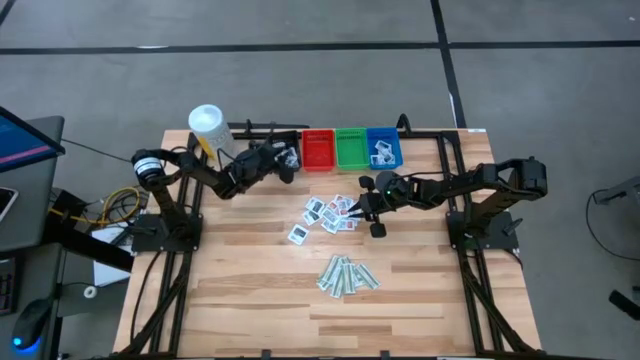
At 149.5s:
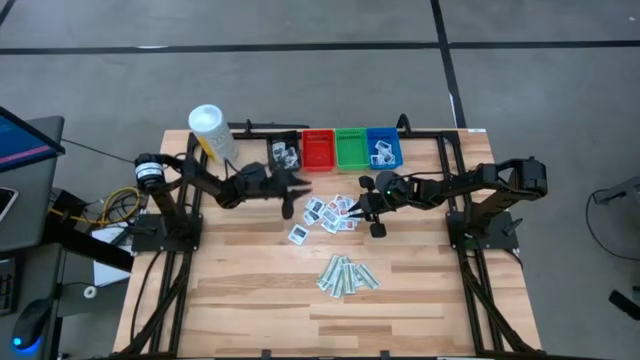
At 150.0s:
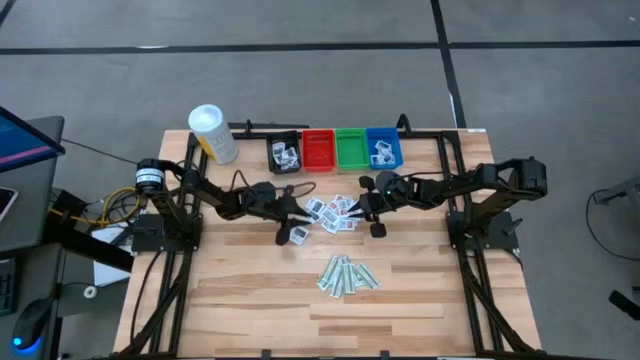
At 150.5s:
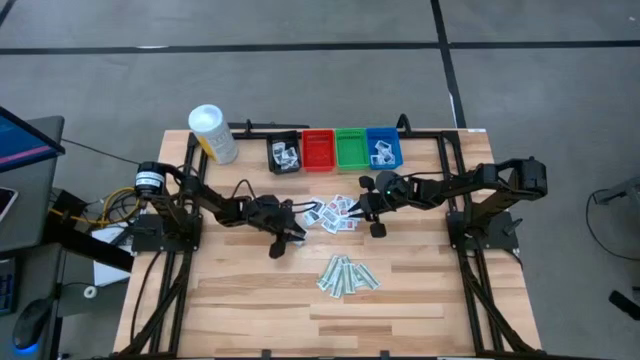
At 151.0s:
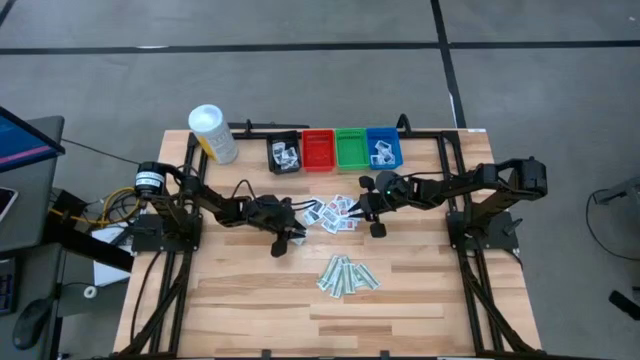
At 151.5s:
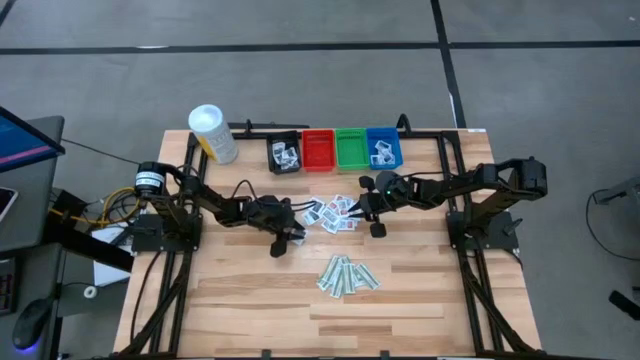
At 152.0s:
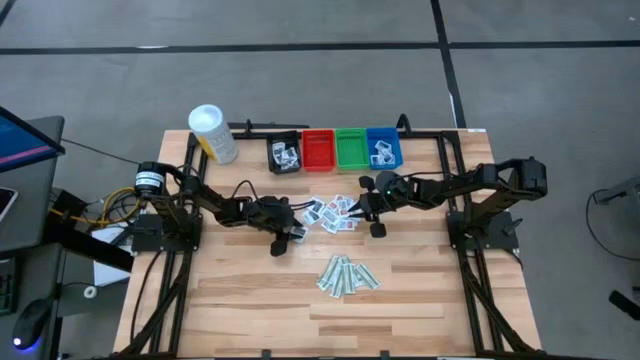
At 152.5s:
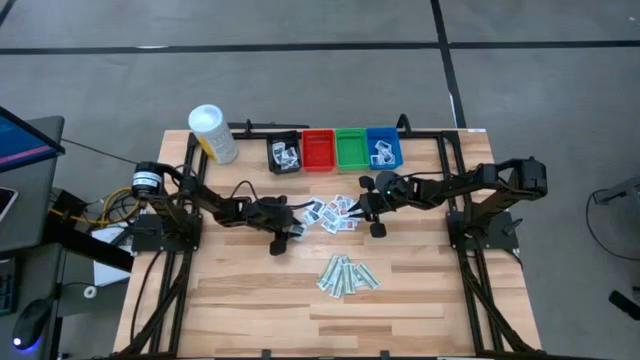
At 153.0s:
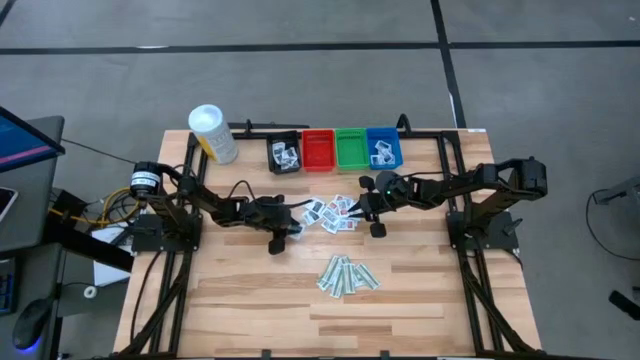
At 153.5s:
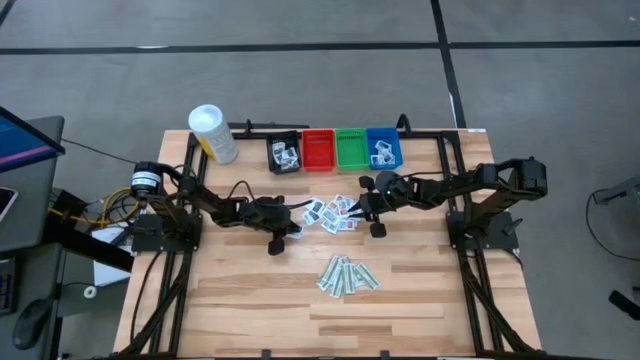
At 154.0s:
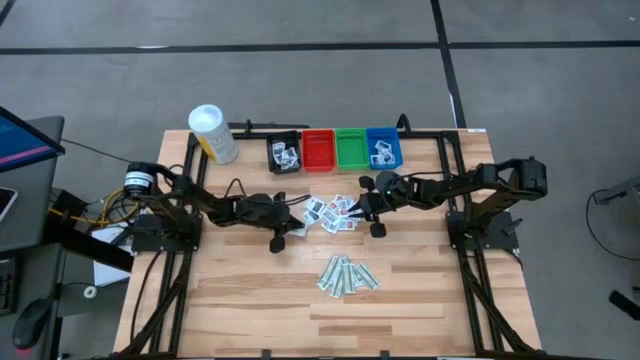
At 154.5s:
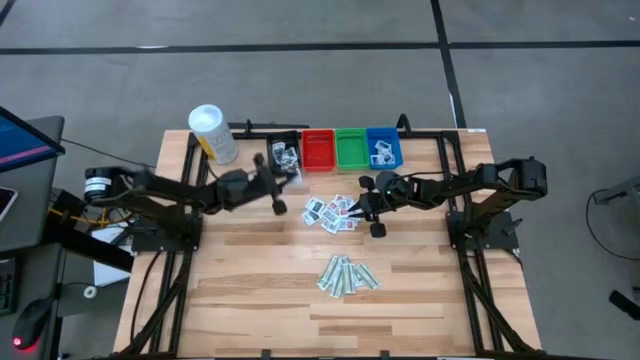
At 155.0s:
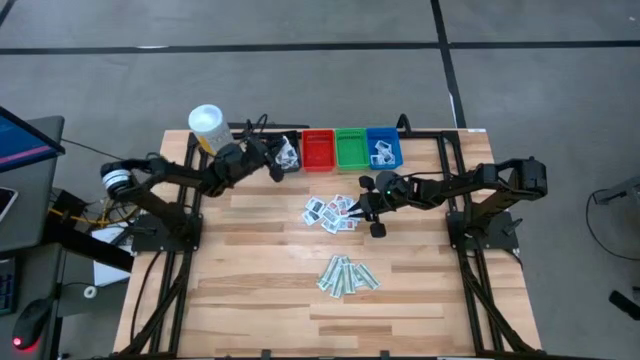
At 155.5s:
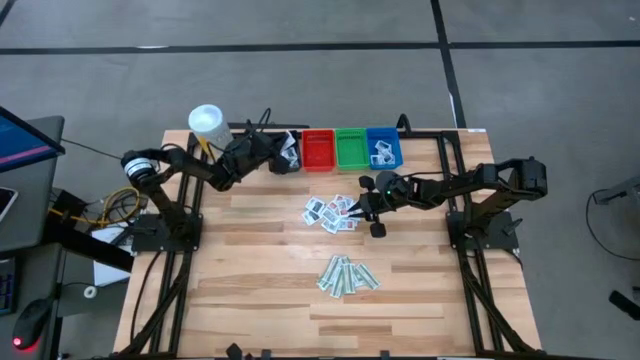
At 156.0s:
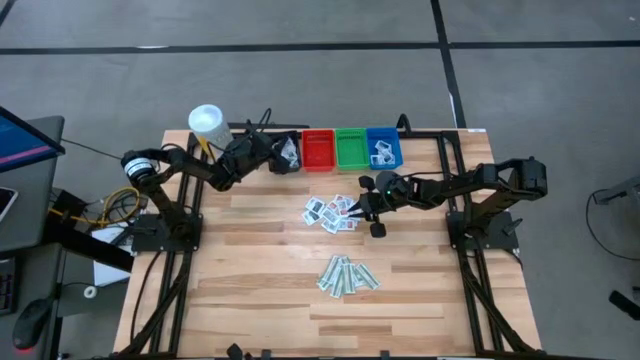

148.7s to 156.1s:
Task: Pick & Place First Aid Supplies
Put the black towelette pack into the black bin

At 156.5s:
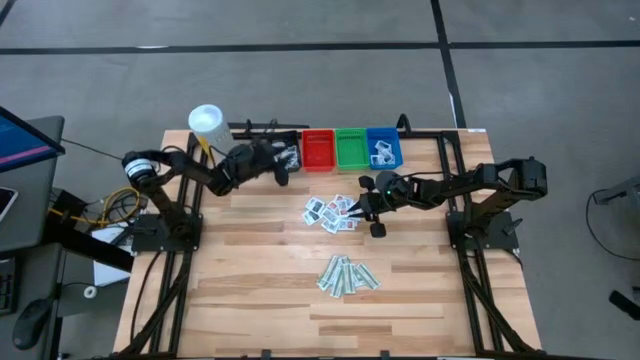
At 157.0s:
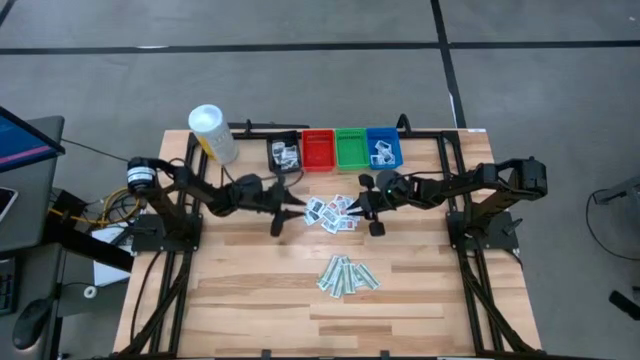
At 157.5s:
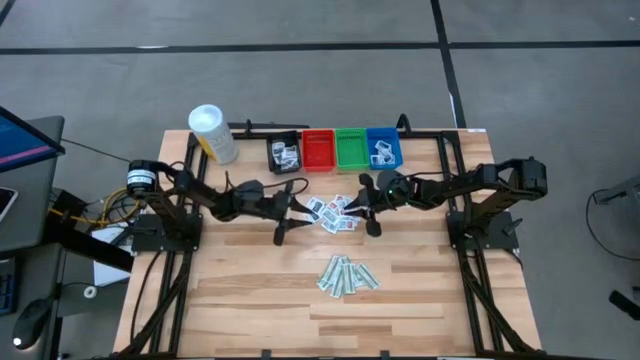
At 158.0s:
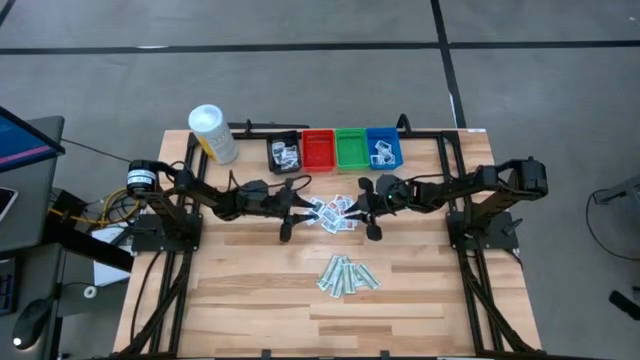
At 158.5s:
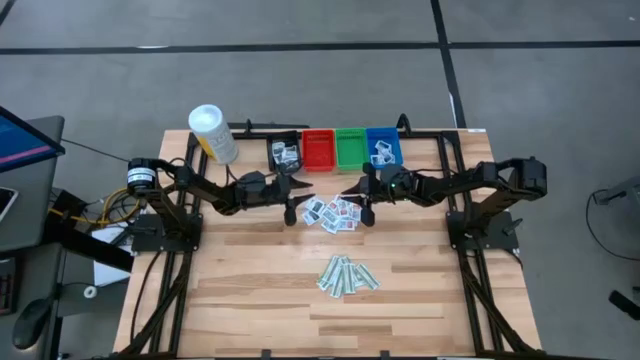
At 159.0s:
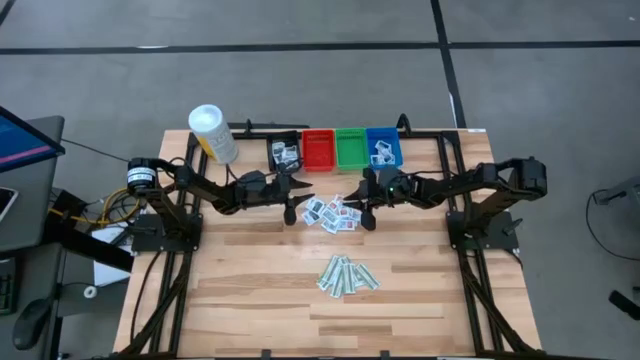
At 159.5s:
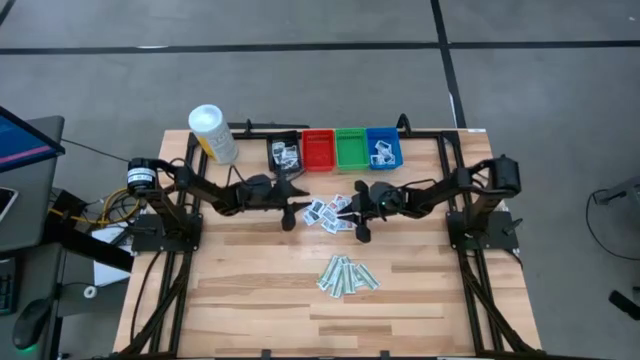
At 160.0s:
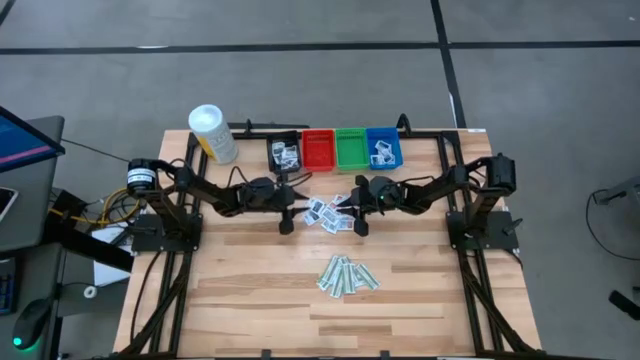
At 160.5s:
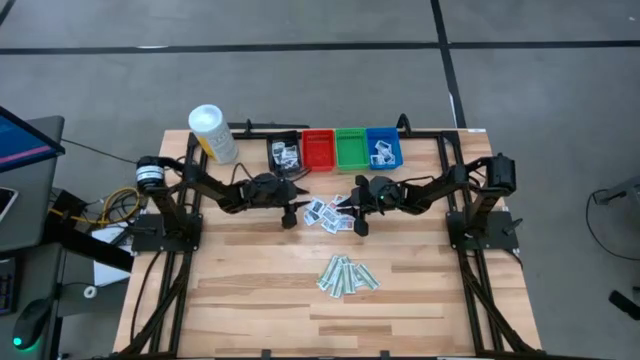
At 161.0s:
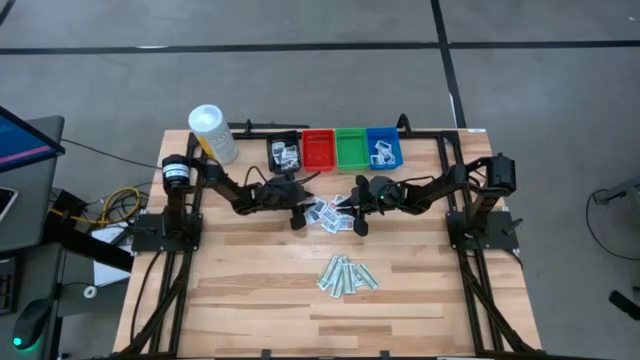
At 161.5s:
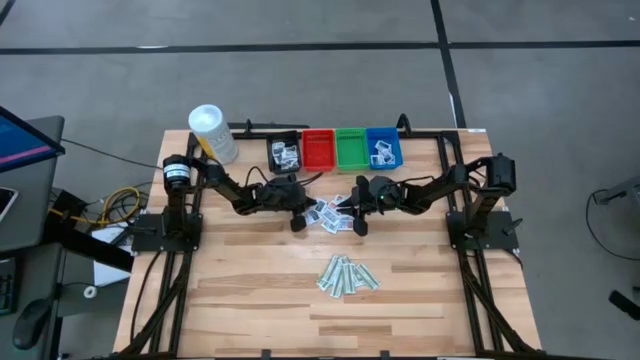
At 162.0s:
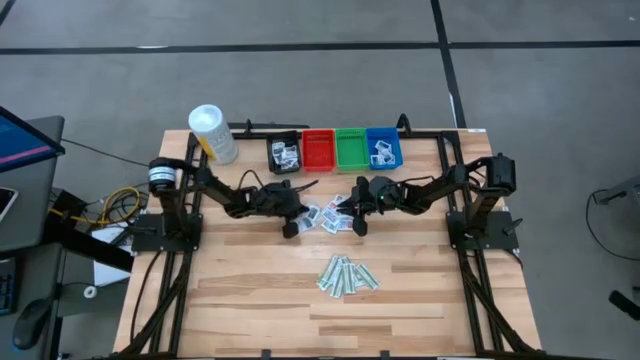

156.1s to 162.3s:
Put the black towelette pack into the black bin

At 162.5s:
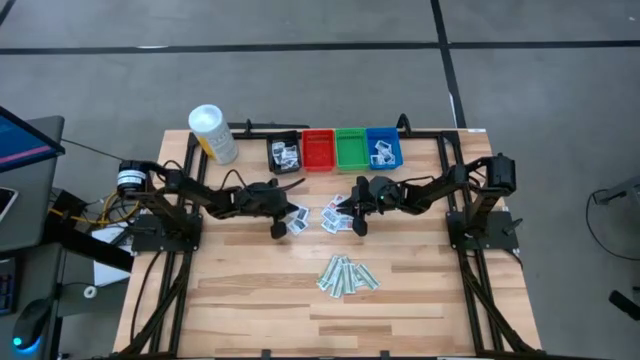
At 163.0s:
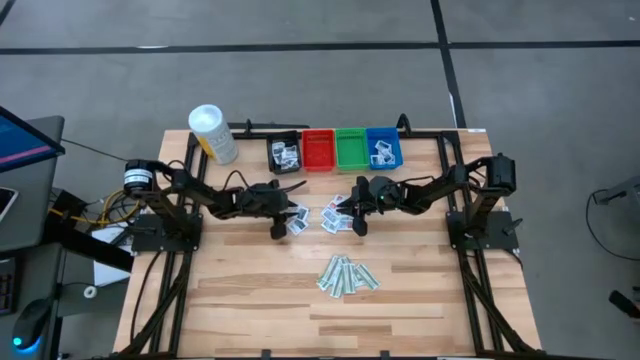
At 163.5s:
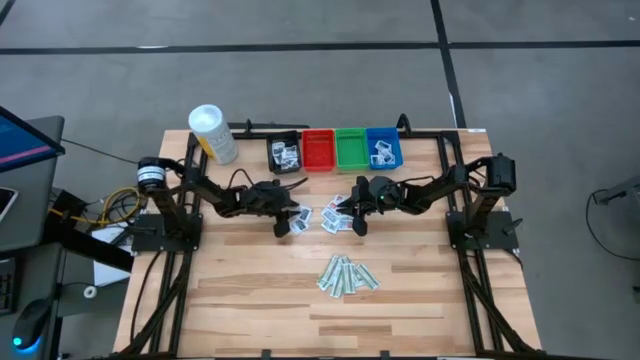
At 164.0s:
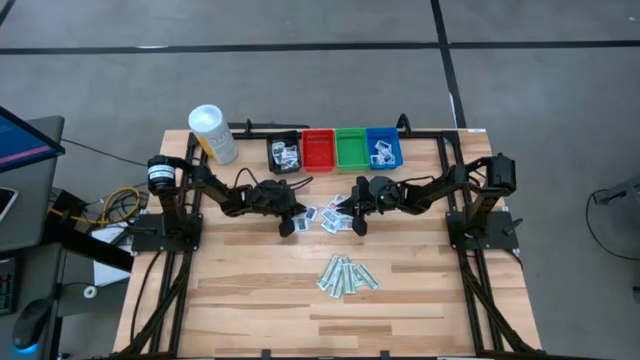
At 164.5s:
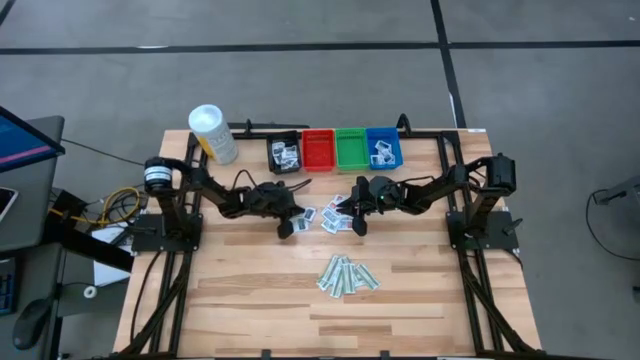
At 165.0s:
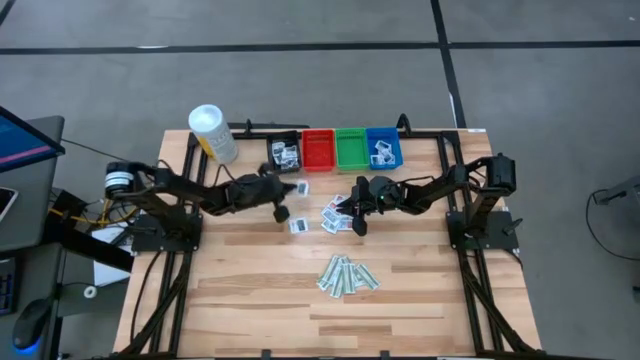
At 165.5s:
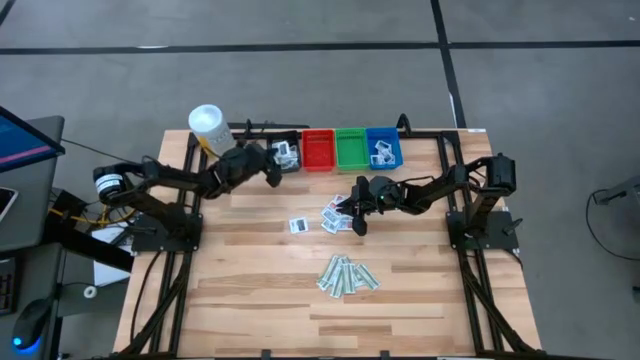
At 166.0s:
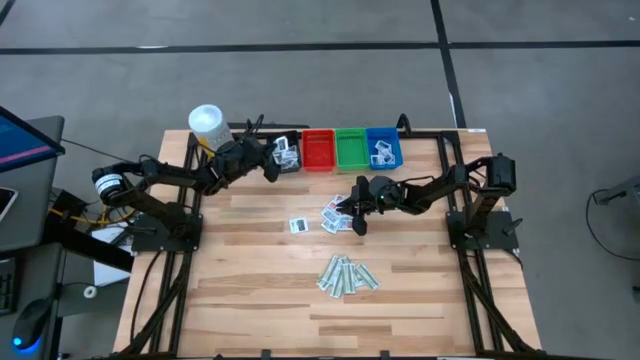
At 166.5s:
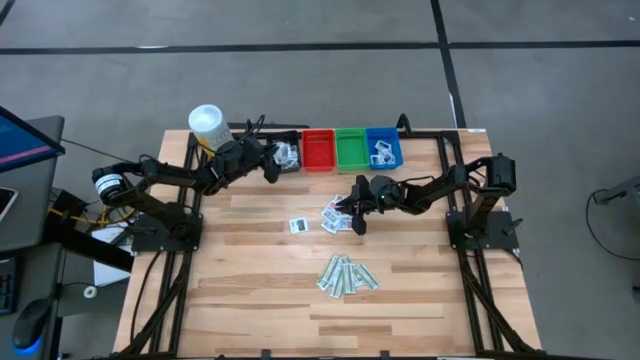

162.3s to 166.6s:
Put the black towelette pack into the black bin

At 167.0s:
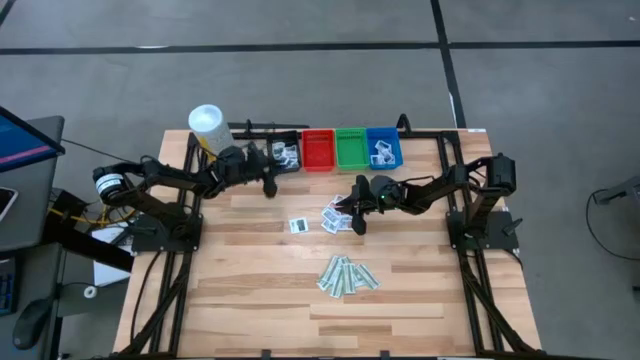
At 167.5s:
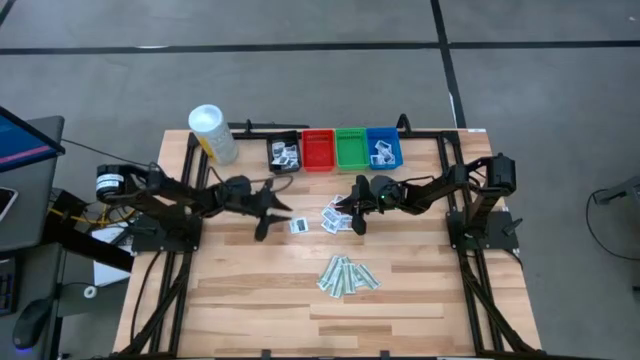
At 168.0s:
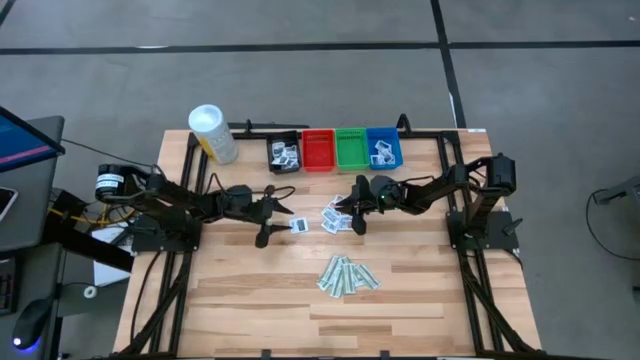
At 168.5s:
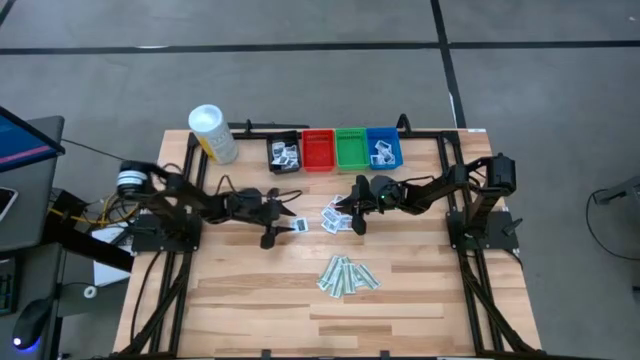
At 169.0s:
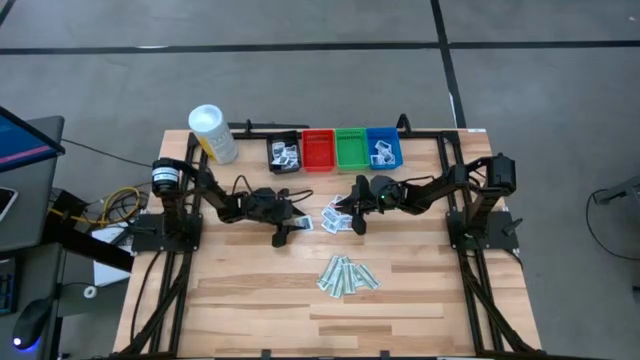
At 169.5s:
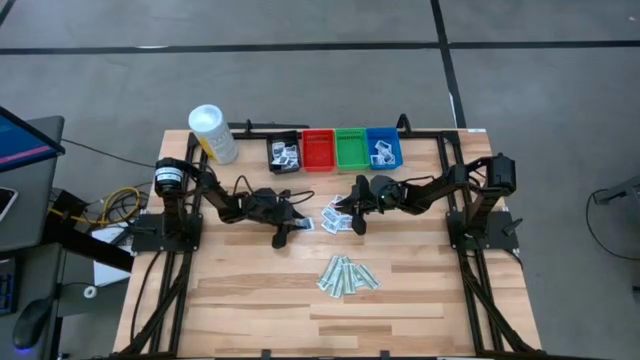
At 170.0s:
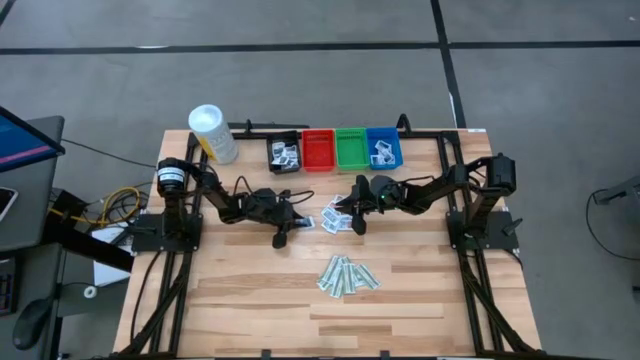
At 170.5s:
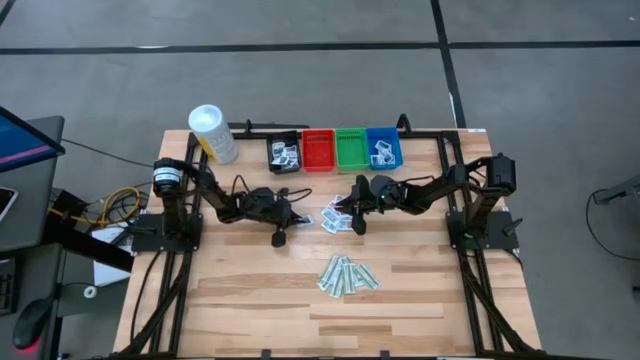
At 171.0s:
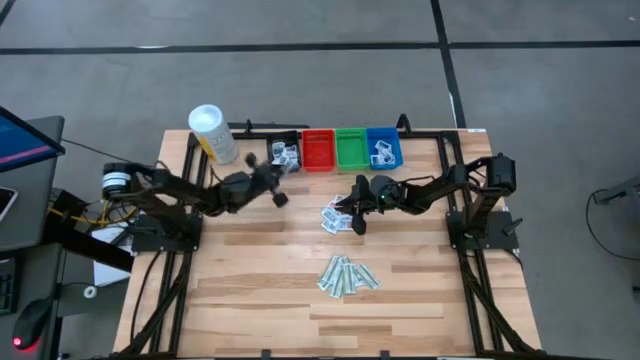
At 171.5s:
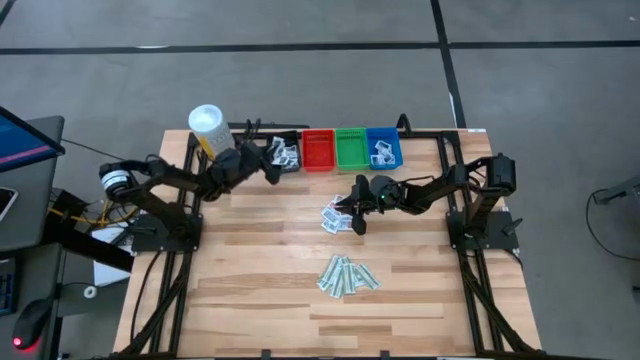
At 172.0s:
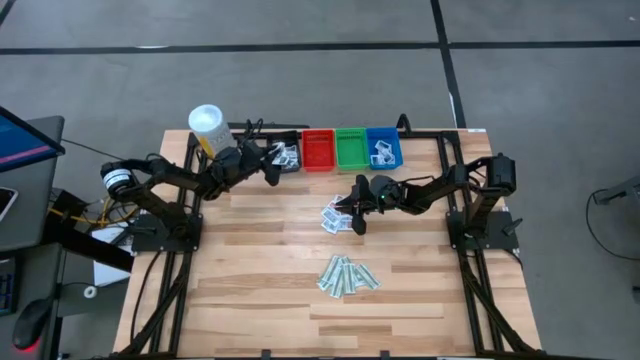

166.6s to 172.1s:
Put the black towelette pack into the black bin
